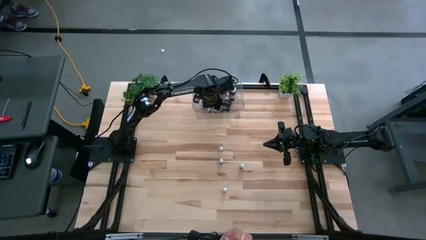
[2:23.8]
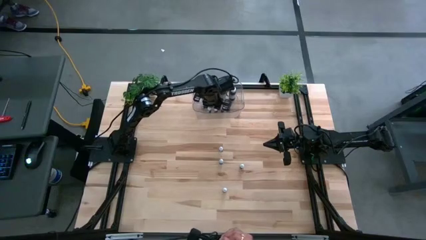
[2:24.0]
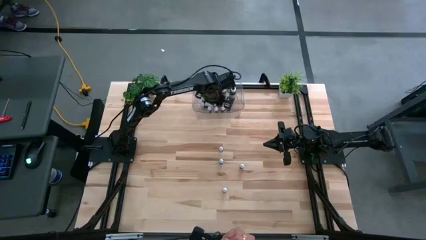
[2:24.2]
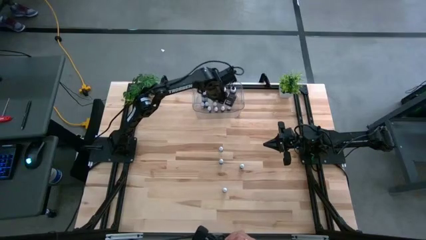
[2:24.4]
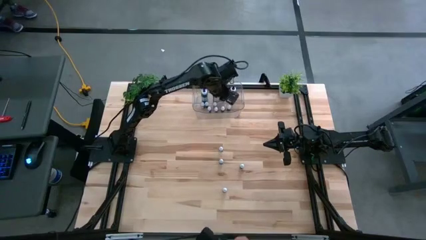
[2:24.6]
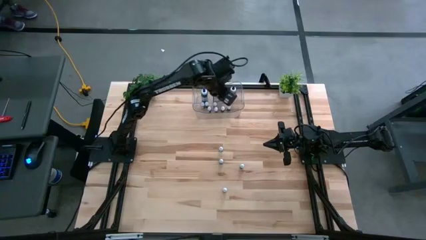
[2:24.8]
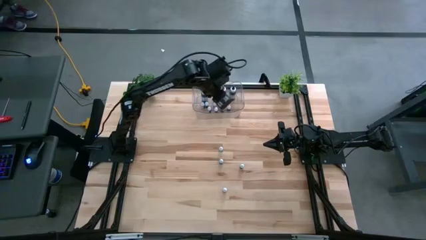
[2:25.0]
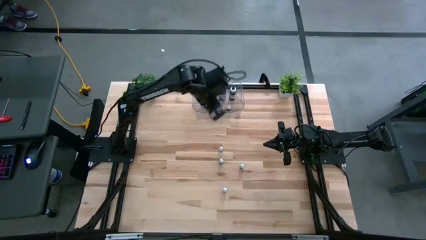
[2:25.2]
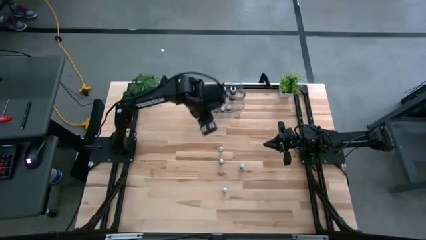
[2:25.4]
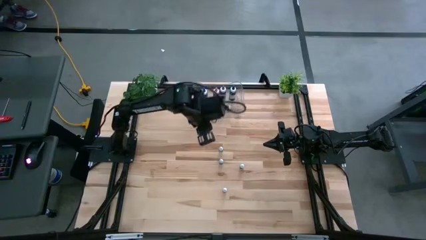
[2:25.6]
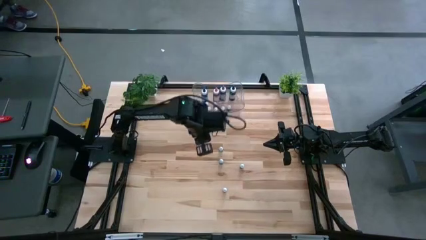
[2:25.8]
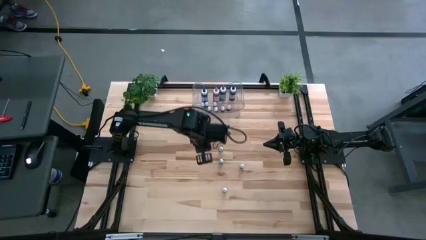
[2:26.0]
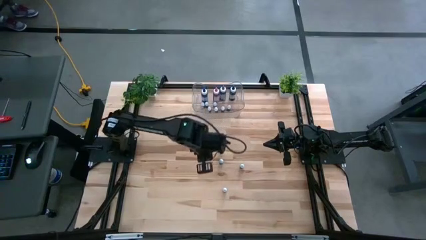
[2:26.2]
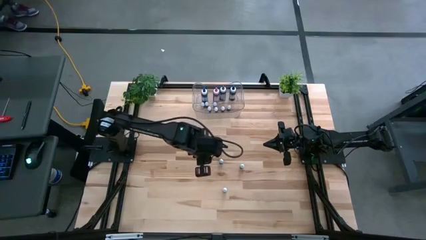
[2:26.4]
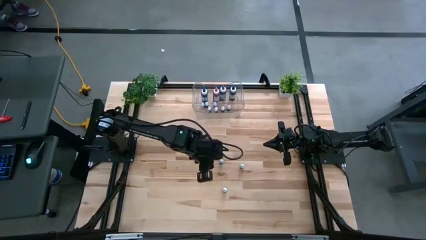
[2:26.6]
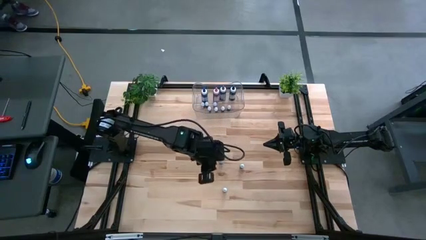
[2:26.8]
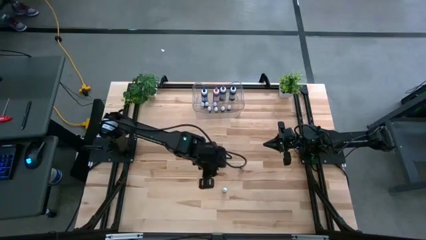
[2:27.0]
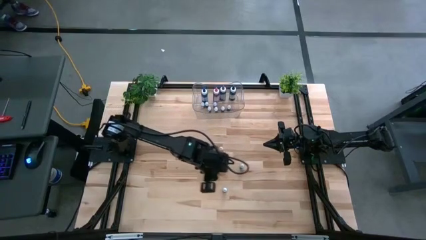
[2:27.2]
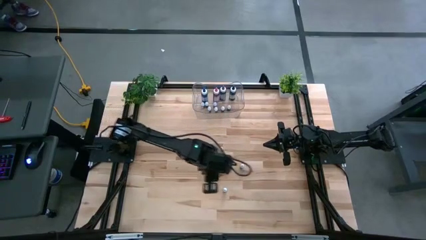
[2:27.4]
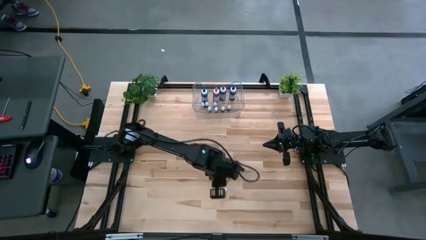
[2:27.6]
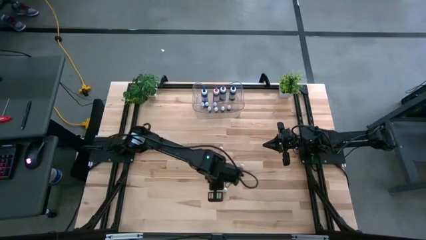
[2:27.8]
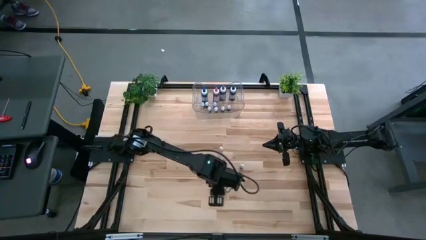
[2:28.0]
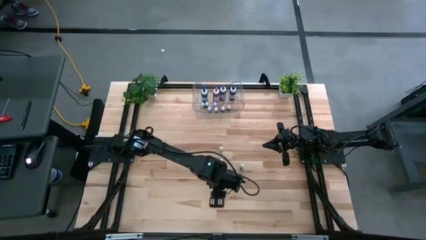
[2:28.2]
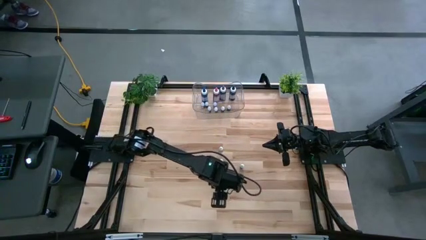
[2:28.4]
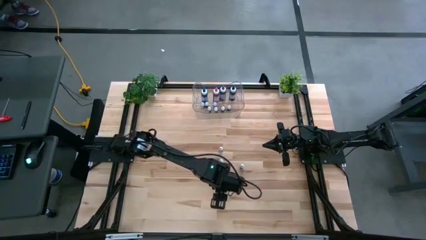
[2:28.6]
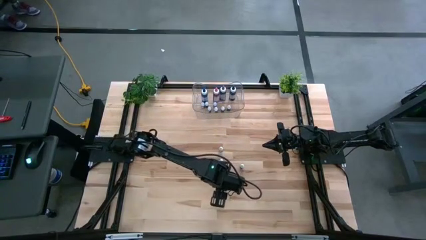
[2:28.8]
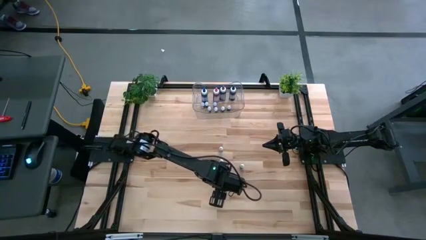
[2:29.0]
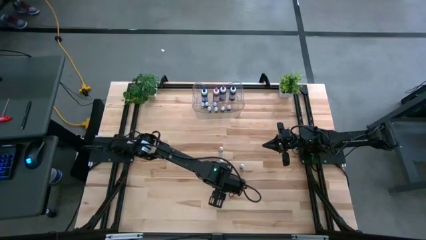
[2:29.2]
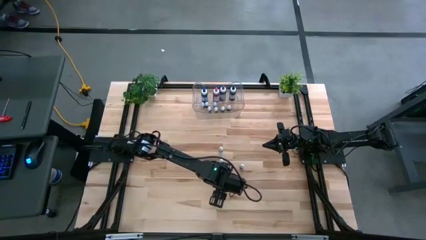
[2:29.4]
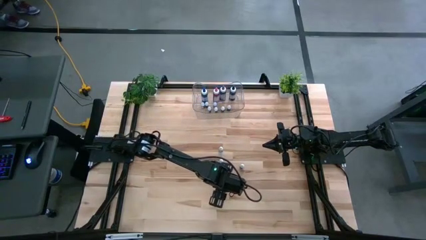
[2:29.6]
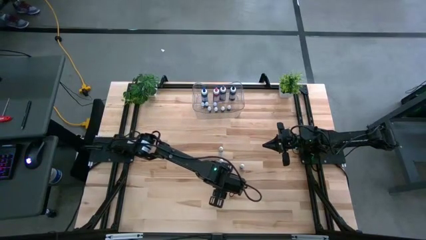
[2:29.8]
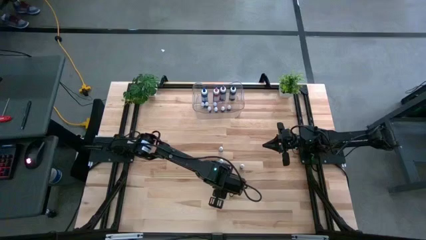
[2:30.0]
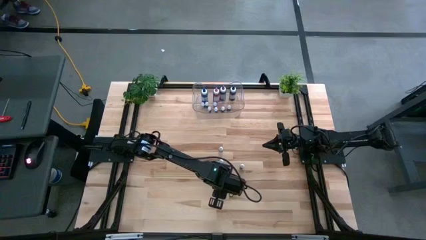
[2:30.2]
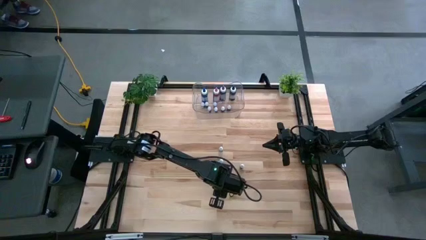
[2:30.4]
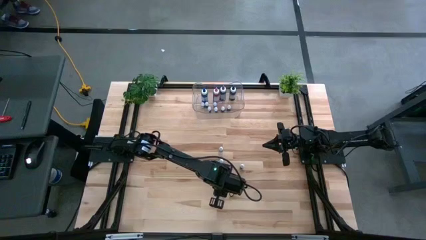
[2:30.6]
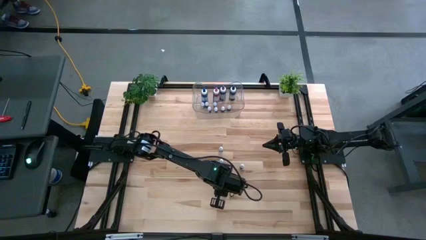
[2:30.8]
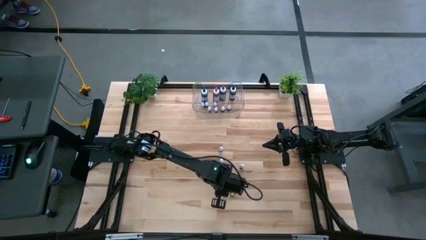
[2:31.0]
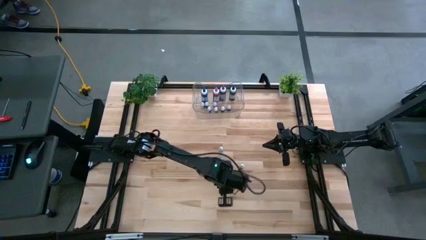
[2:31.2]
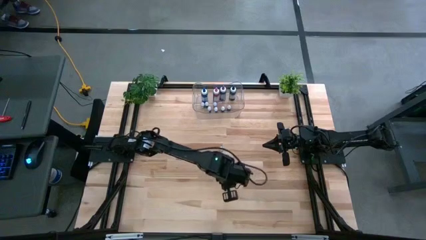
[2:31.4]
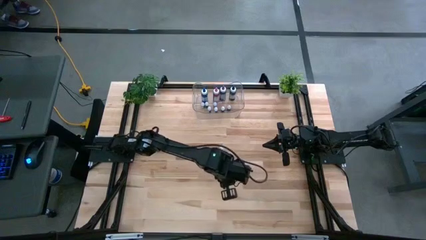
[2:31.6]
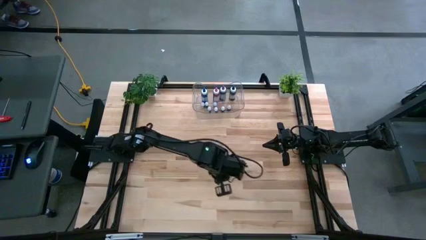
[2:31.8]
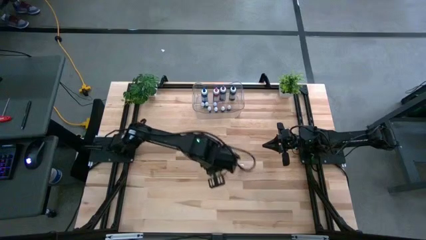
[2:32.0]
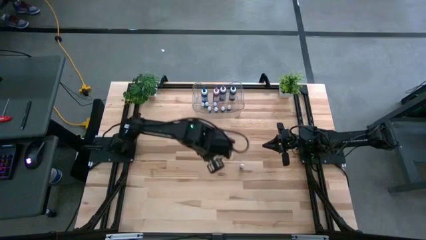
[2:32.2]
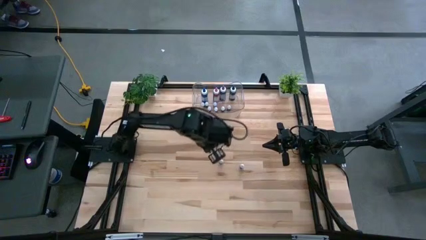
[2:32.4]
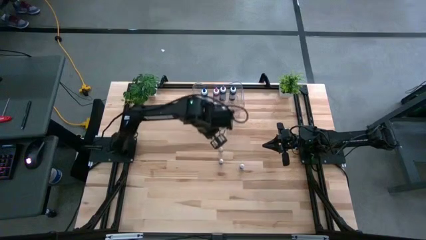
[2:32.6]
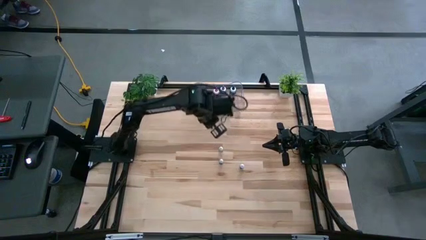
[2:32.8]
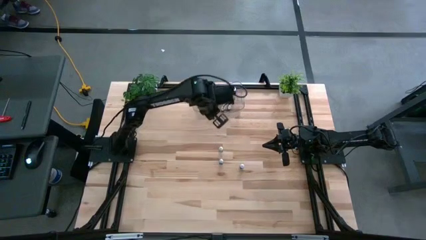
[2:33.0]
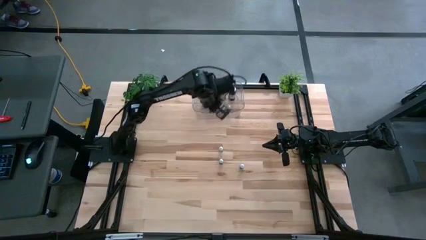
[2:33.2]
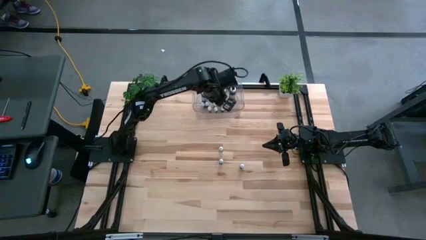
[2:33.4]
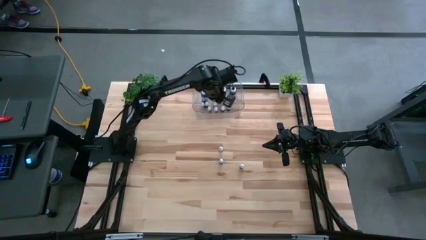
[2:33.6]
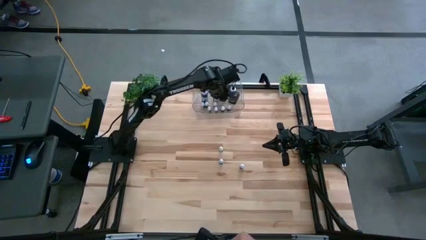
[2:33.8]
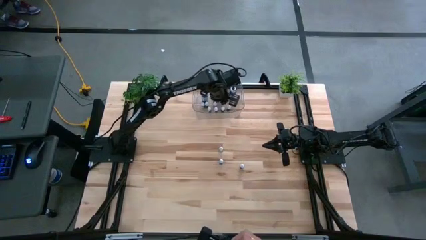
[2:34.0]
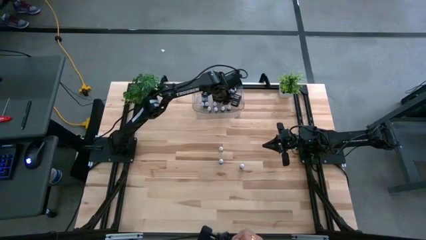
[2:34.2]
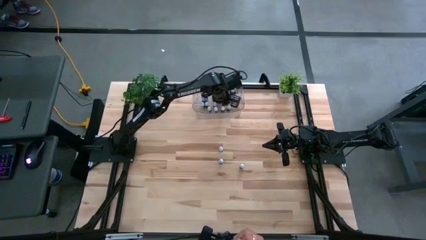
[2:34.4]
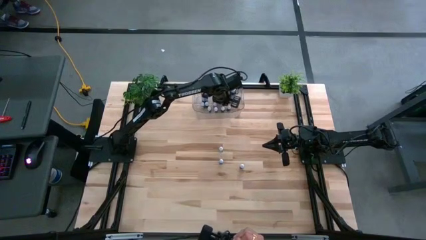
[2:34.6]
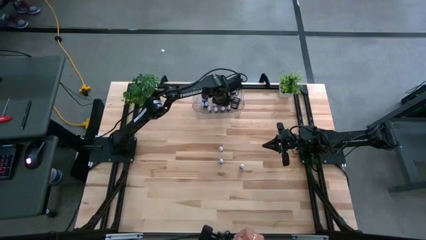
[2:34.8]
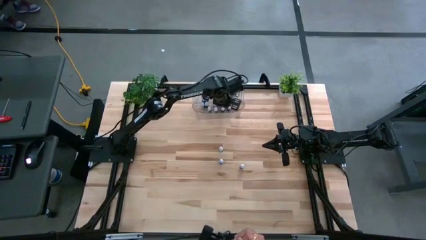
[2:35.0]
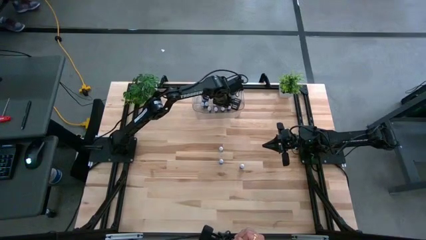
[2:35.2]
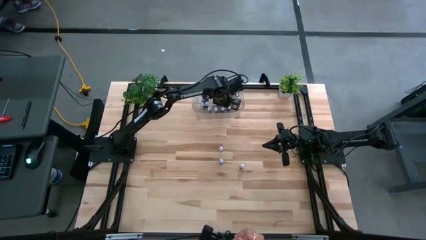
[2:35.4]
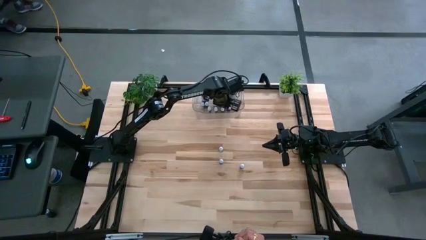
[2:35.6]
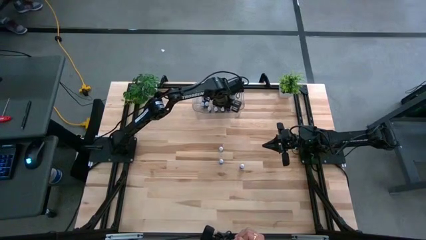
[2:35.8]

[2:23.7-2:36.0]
Task: Pick & Place food coloring
Put the bottom small purple food coloring bottle into the transparent bin
